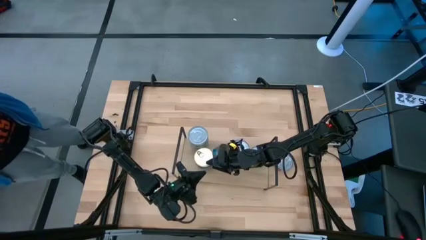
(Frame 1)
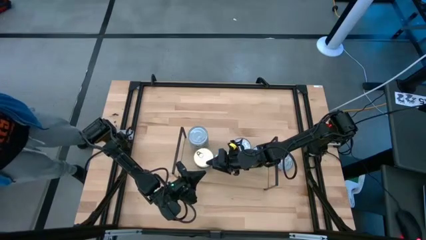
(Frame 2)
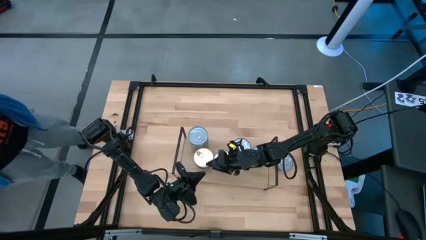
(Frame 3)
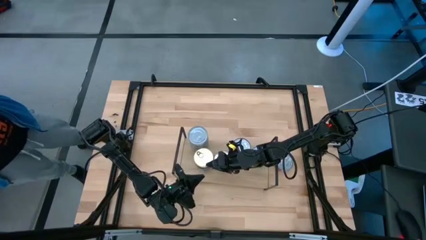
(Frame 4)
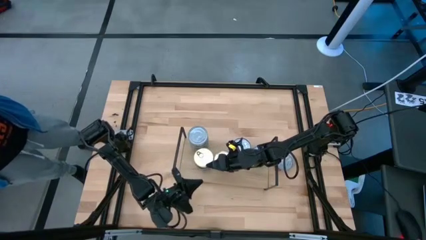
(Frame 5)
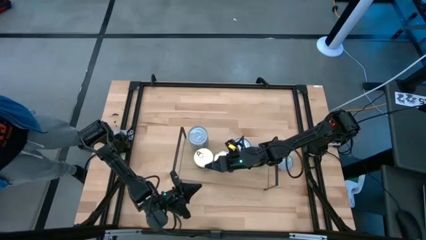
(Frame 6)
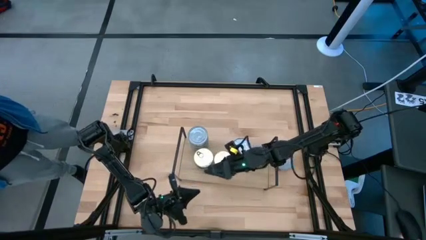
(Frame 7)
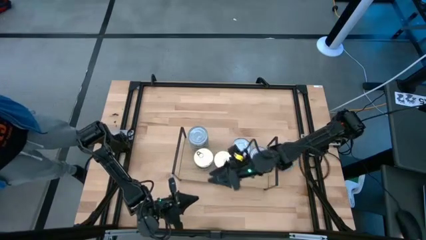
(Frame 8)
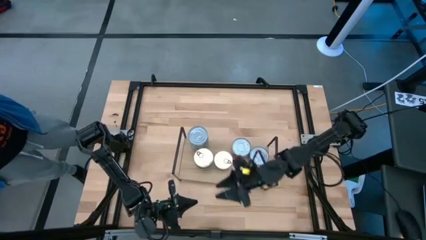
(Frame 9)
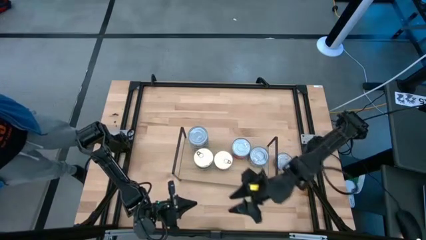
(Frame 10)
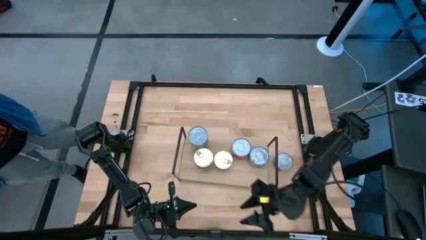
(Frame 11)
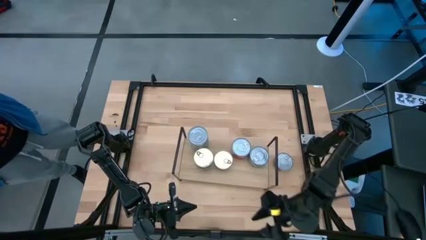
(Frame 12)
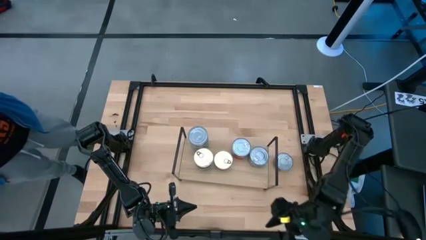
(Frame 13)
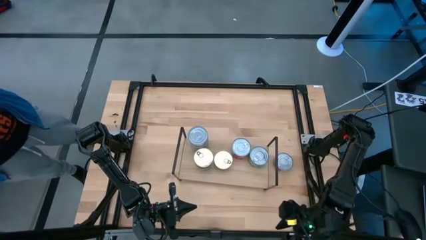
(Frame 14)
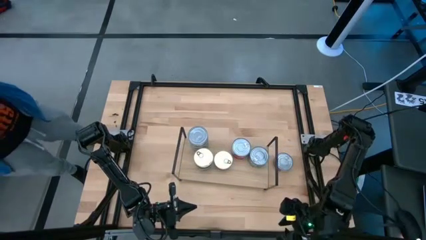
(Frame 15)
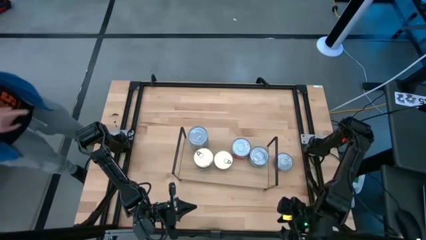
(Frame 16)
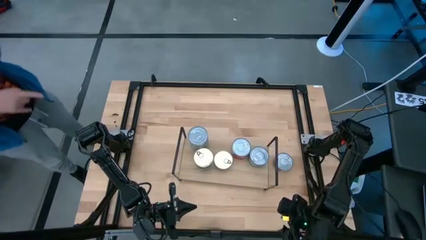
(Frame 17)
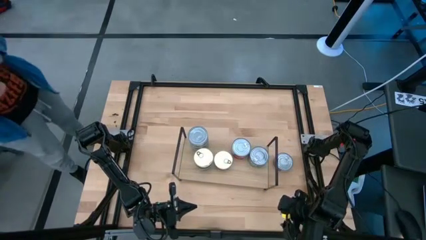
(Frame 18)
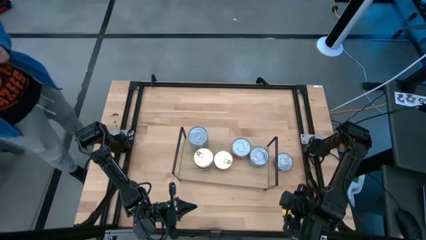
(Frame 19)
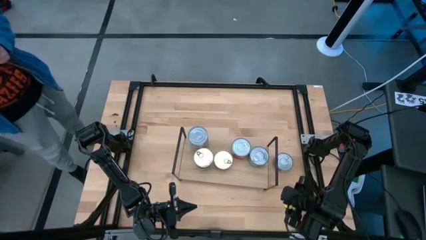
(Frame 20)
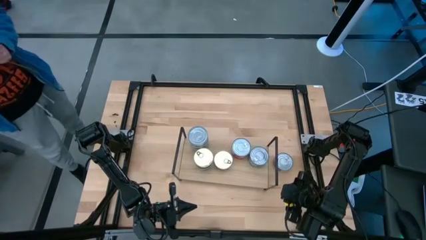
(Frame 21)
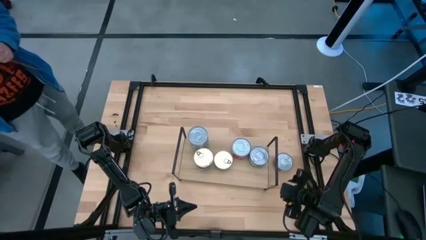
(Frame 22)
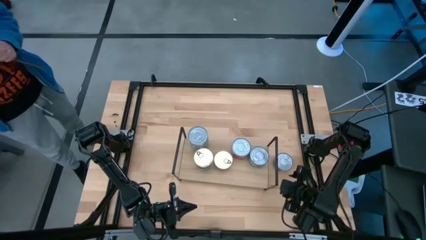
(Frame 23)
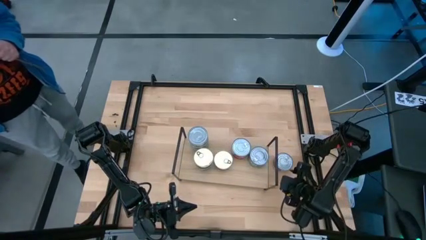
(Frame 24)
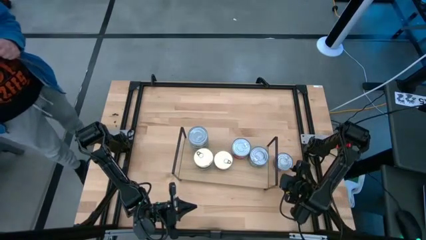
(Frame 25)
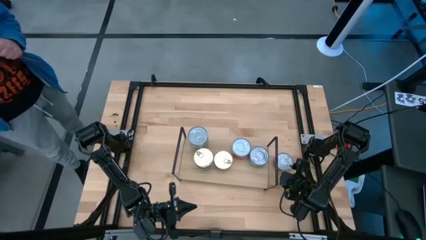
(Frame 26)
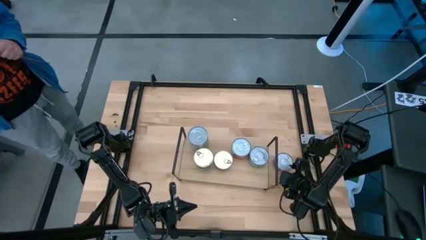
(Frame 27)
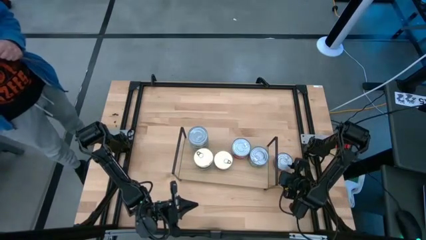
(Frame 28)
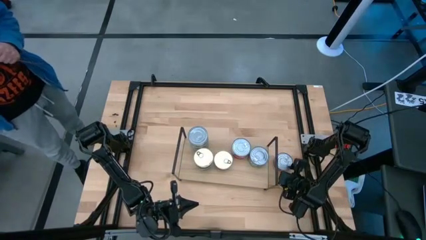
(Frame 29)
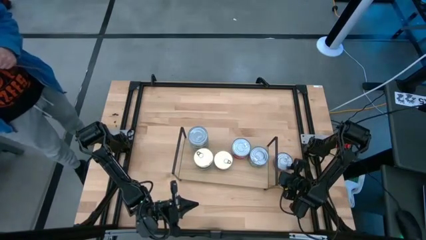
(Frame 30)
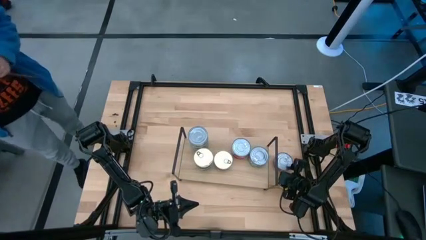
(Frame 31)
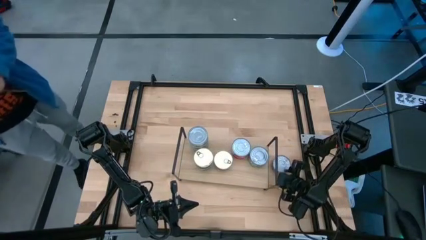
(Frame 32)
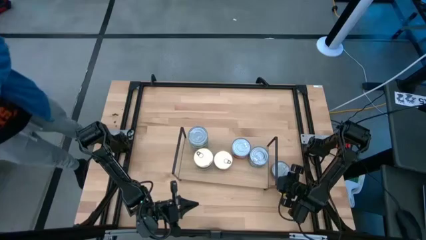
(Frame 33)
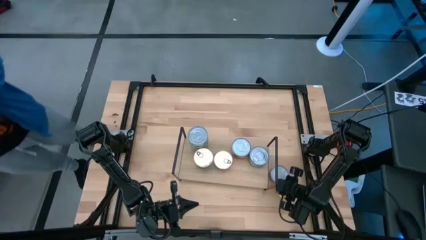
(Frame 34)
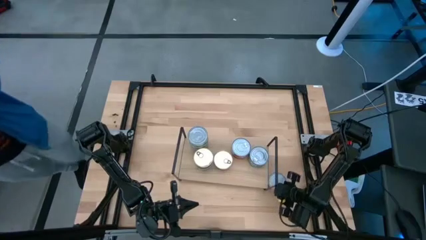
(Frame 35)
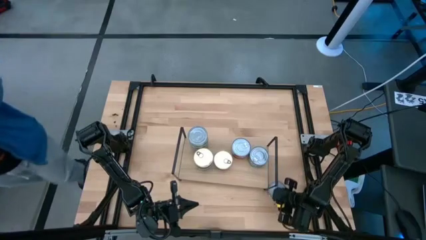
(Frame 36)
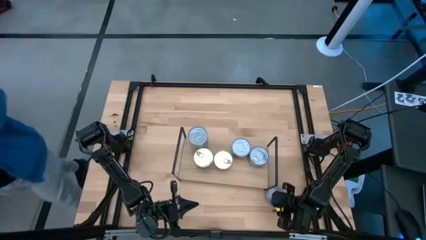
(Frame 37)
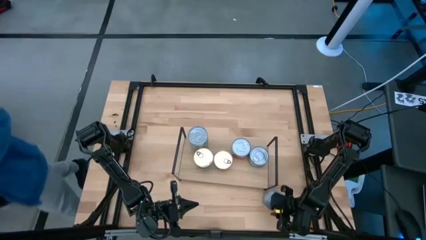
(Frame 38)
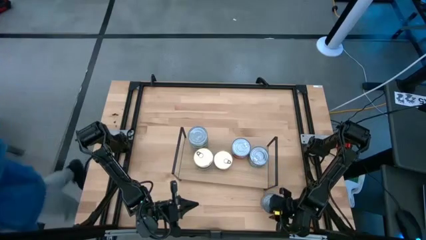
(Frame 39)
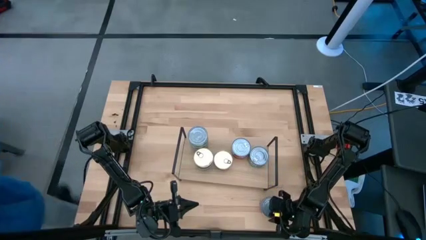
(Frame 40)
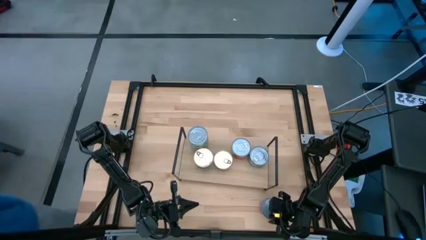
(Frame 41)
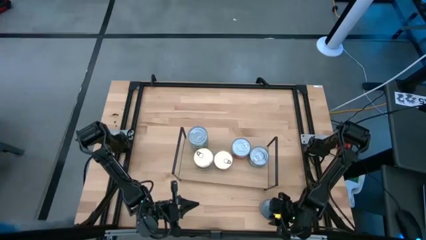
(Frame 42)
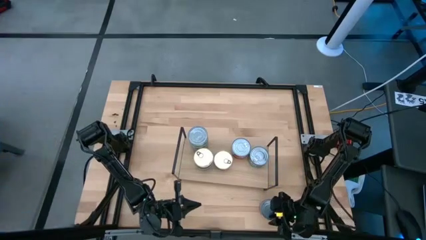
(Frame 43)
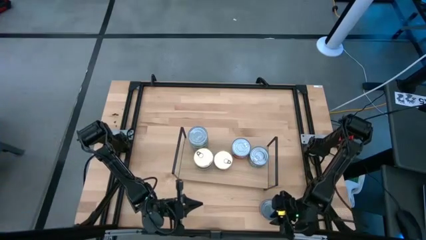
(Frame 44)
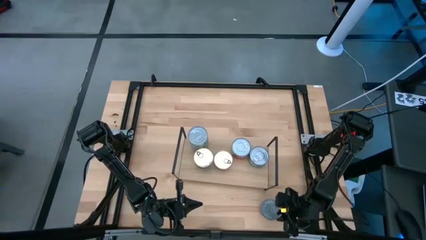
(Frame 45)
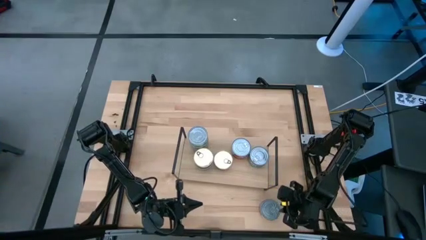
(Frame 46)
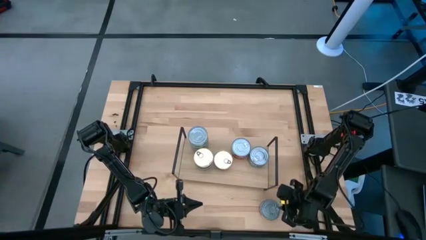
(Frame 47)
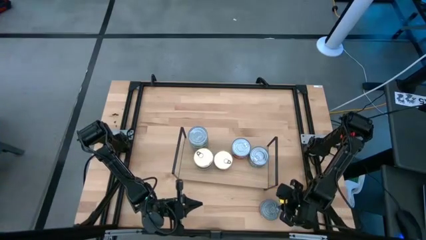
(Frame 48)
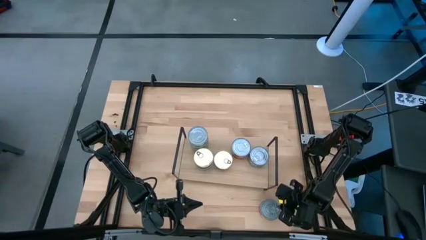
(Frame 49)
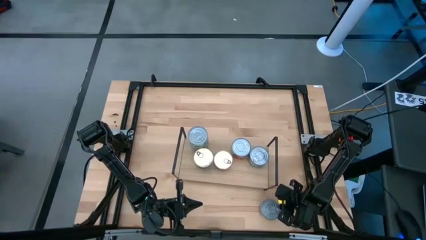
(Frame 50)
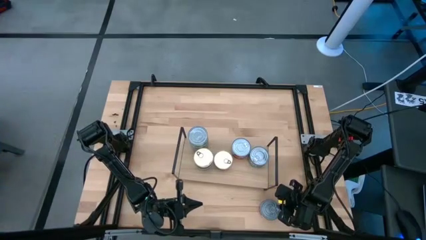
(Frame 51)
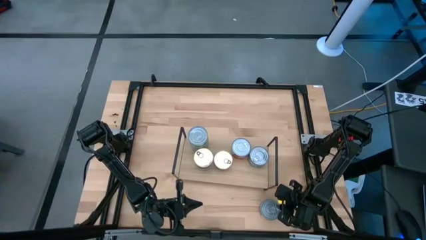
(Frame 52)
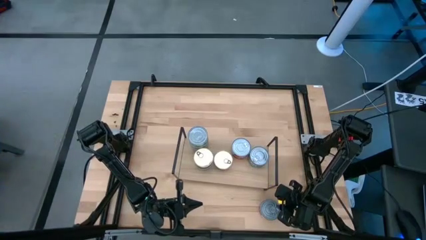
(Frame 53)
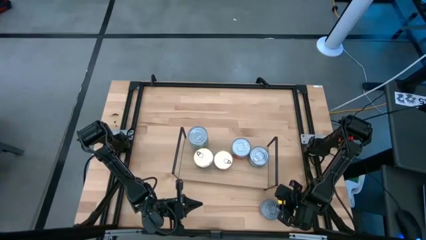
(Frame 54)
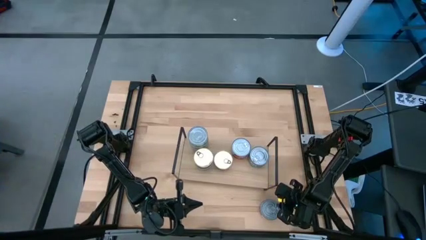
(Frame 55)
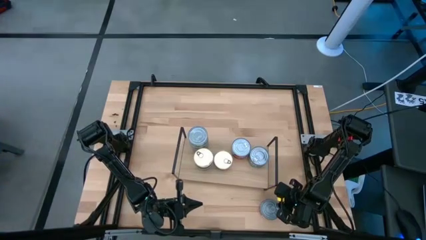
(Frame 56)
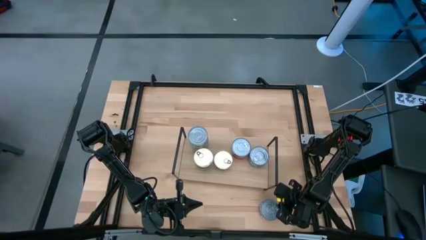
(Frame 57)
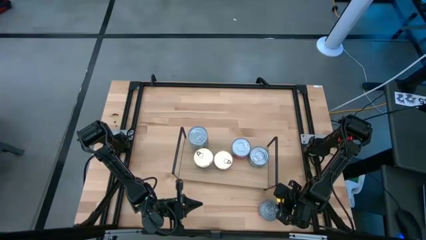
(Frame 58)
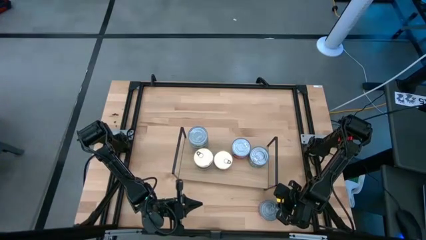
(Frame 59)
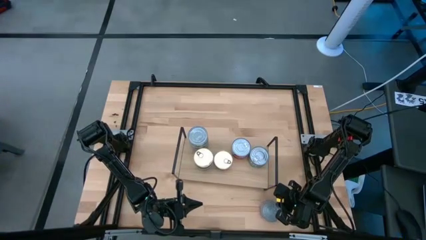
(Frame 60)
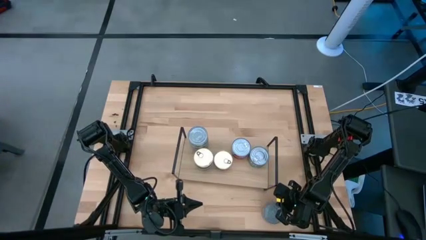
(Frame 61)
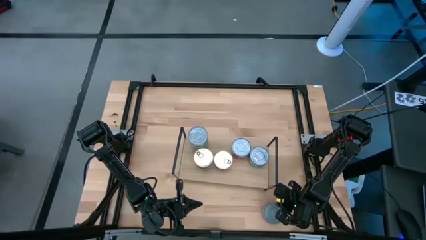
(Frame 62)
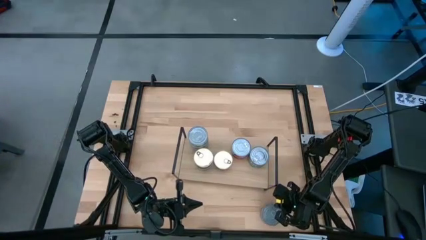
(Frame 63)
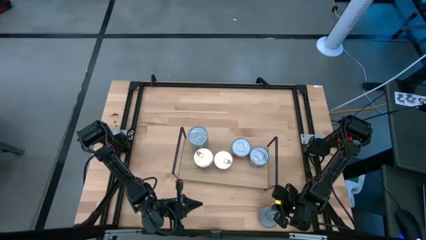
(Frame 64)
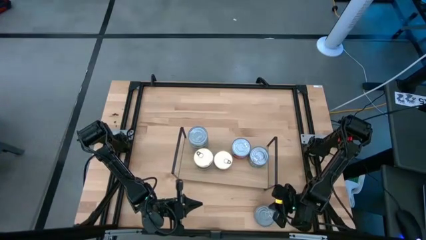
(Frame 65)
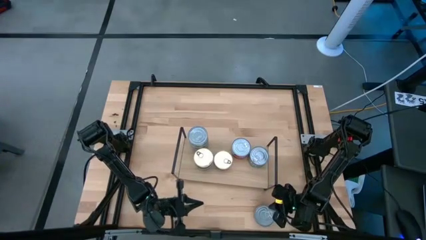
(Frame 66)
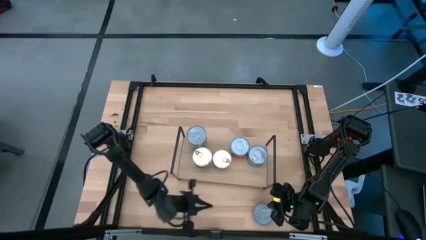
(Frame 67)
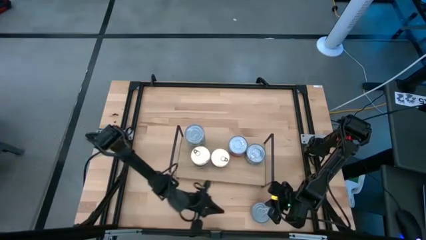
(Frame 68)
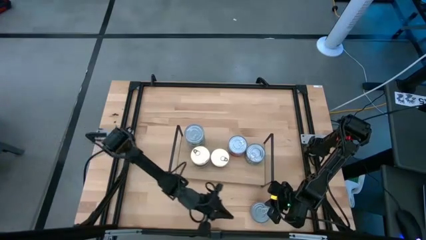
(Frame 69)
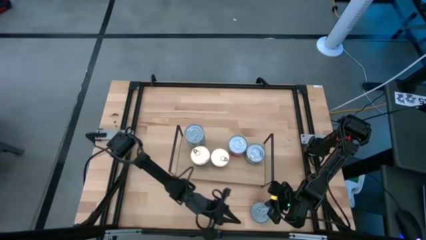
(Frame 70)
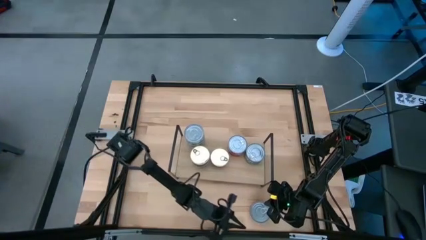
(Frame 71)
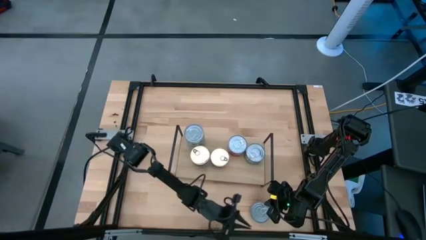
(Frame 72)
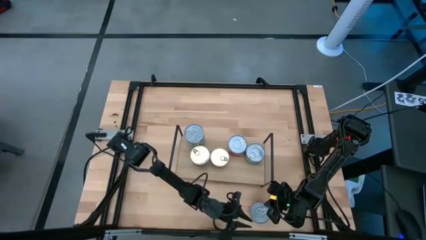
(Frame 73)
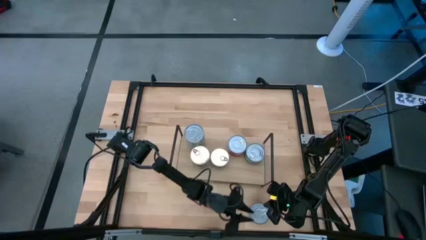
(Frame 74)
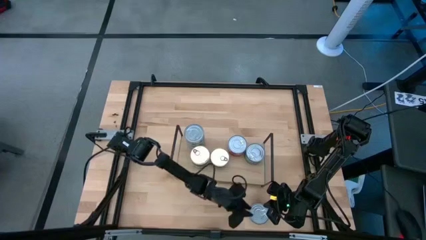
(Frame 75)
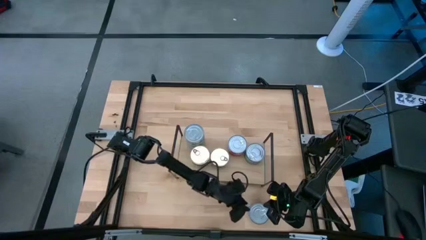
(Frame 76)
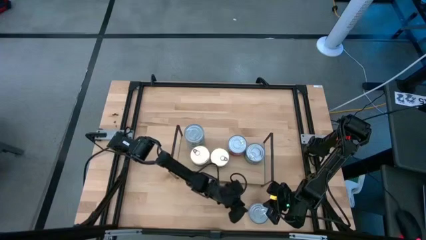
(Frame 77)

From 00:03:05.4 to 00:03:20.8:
Task: Stack canned seafood by type on shelf
Stack the red tuna can on top of the red tuna cans on the shelf

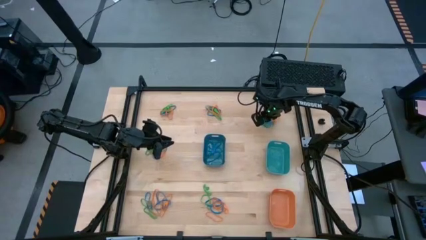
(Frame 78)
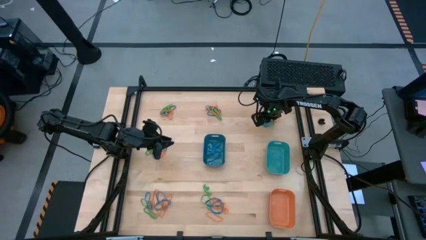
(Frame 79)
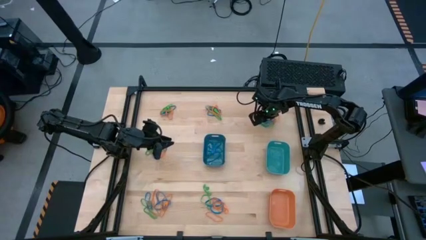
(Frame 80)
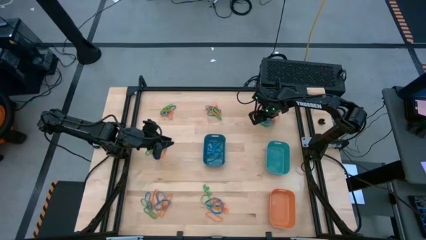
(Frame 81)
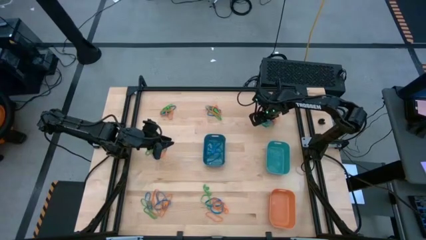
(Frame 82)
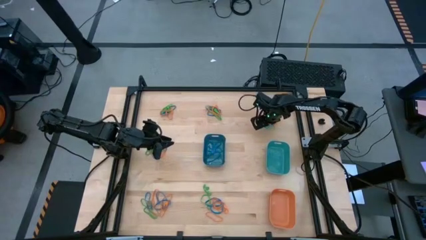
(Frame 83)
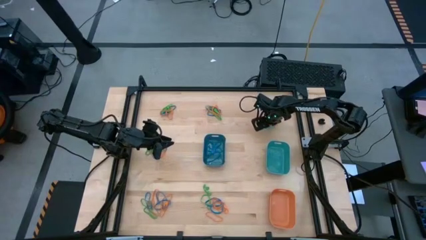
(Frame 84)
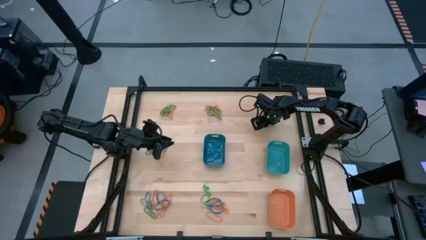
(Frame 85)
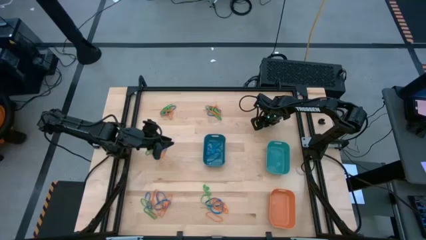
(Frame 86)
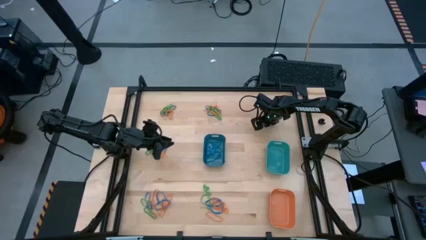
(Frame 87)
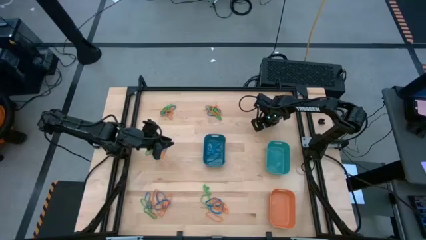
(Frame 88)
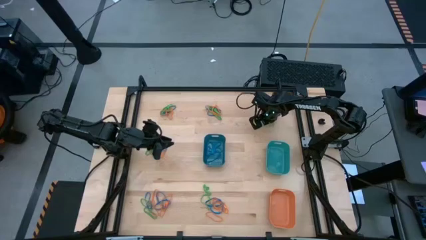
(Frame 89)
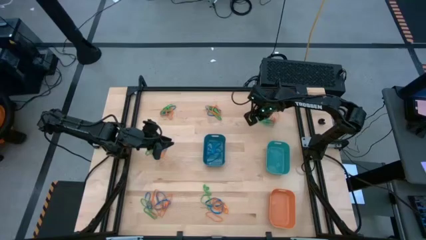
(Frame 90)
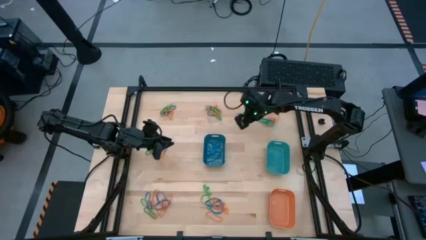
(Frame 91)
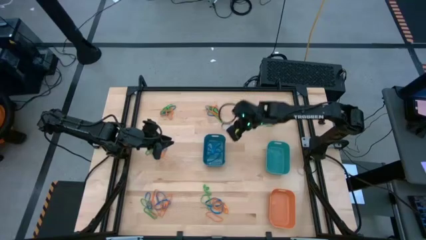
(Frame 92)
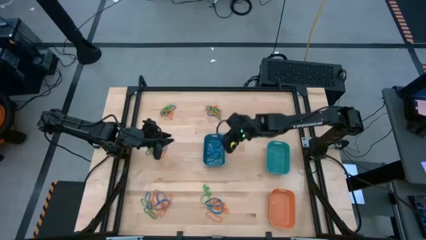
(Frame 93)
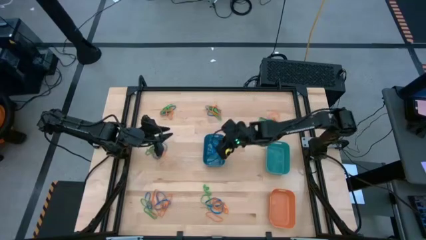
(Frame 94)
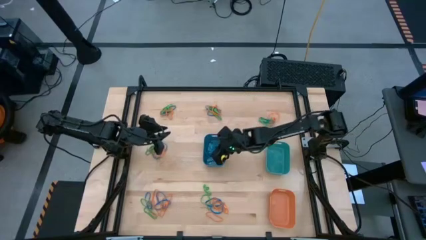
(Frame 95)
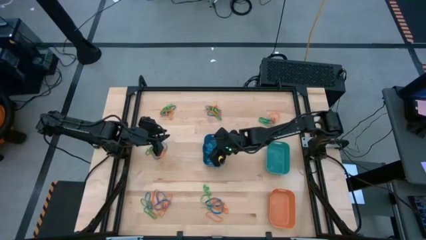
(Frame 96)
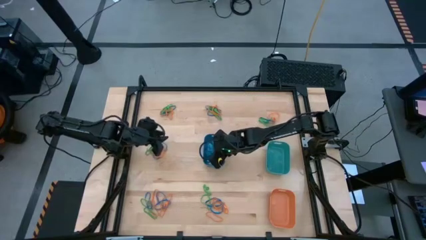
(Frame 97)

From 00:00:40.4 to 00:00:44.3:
Task: Sort rubber bands into baskets
Put the blue rubberband into the blue bin
